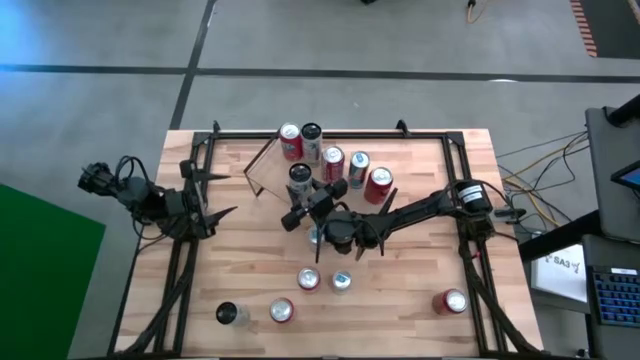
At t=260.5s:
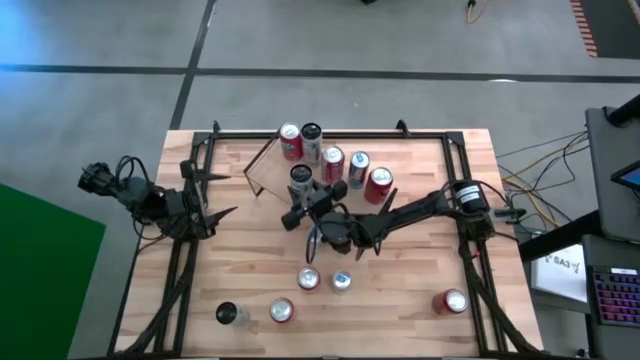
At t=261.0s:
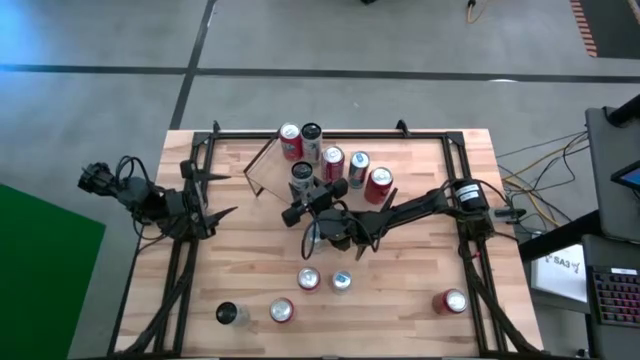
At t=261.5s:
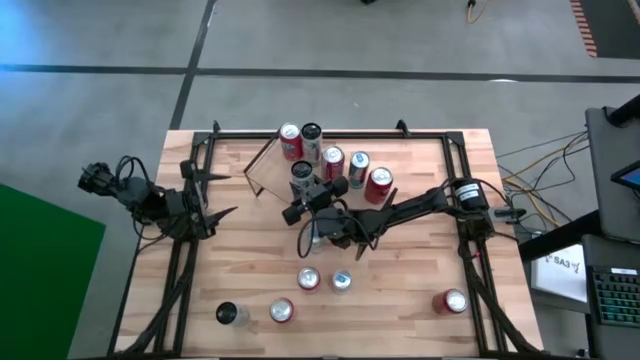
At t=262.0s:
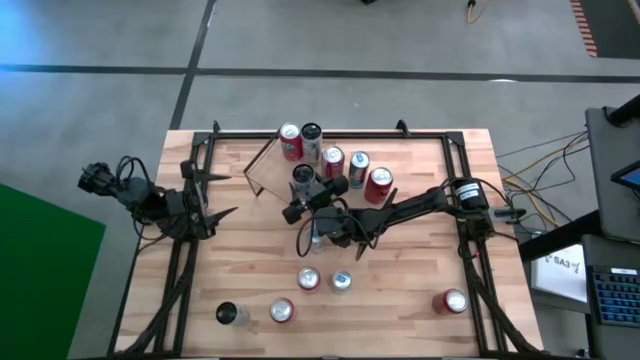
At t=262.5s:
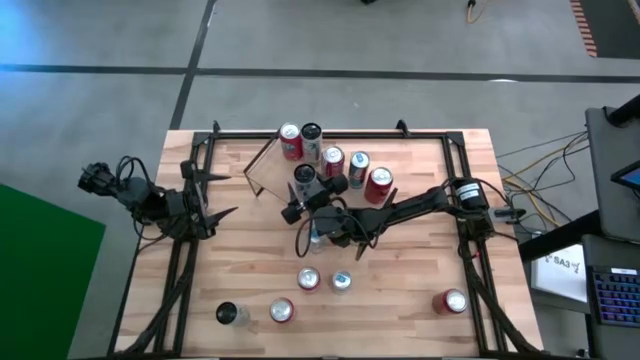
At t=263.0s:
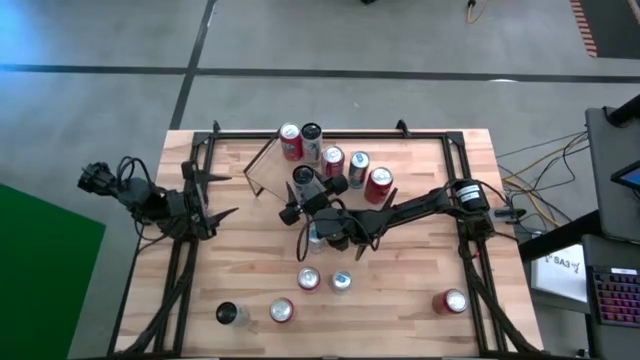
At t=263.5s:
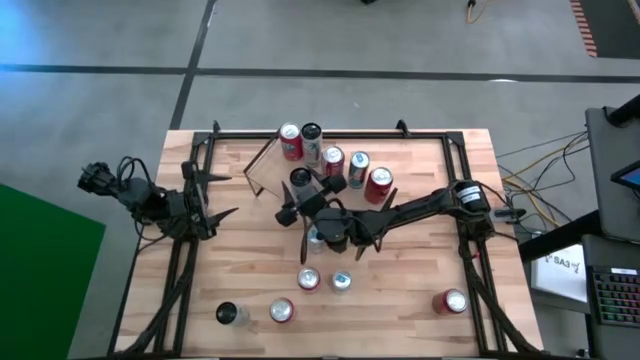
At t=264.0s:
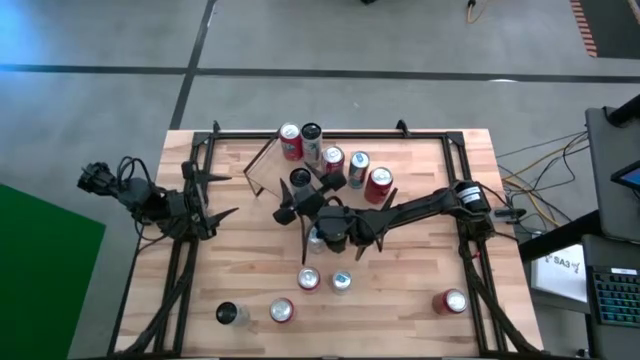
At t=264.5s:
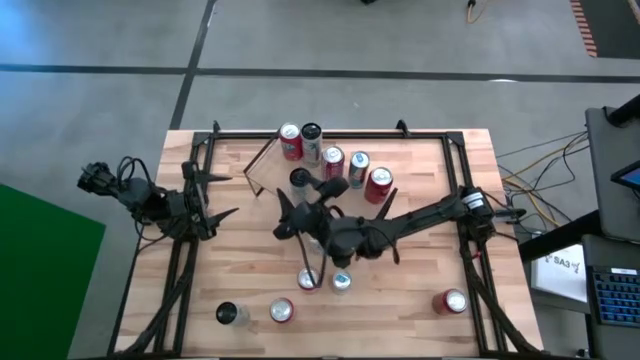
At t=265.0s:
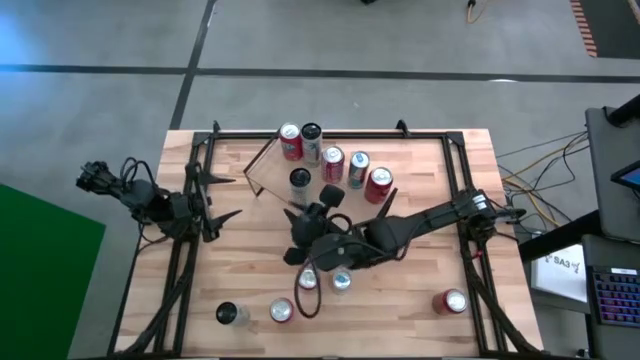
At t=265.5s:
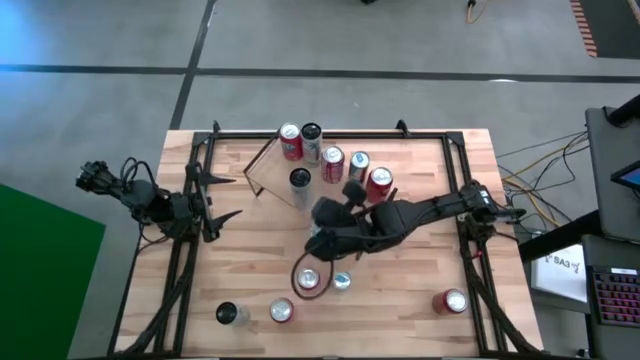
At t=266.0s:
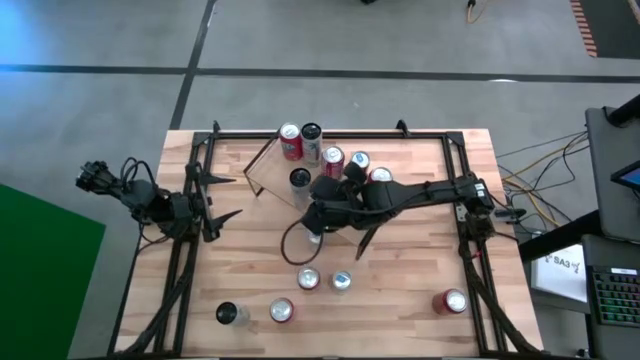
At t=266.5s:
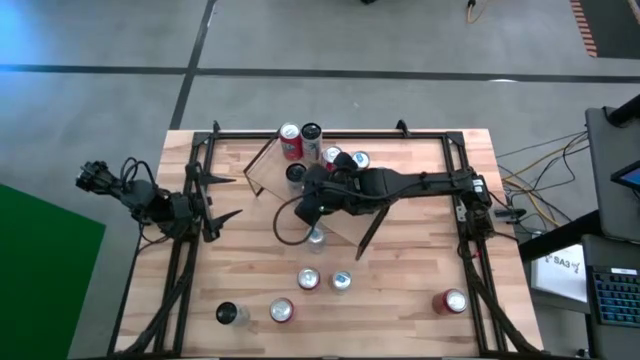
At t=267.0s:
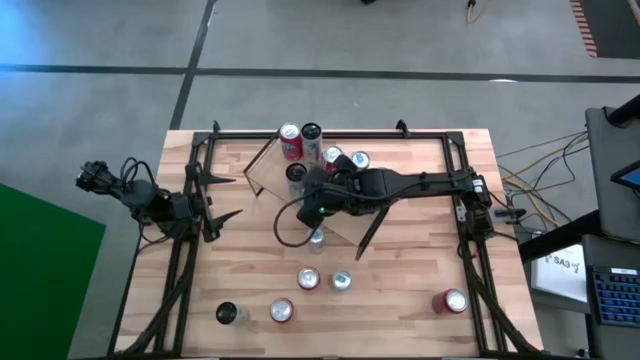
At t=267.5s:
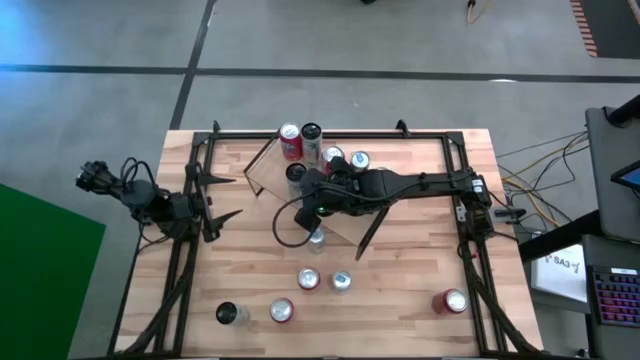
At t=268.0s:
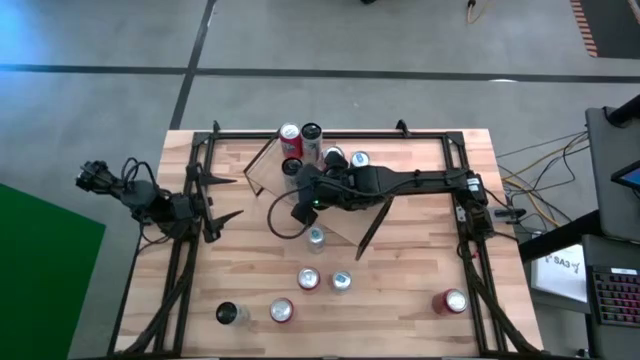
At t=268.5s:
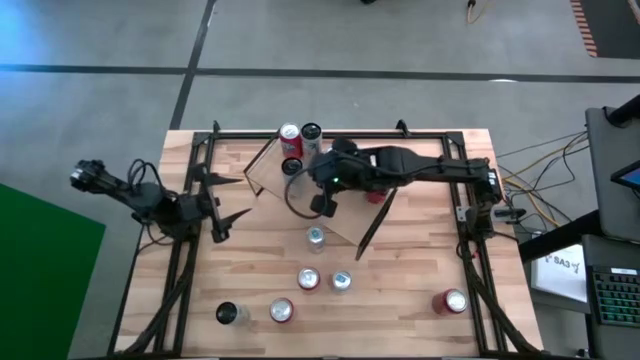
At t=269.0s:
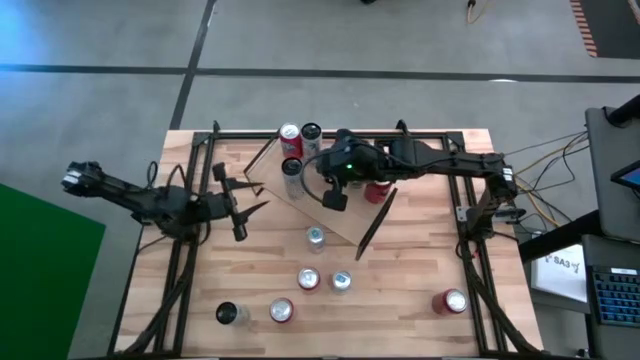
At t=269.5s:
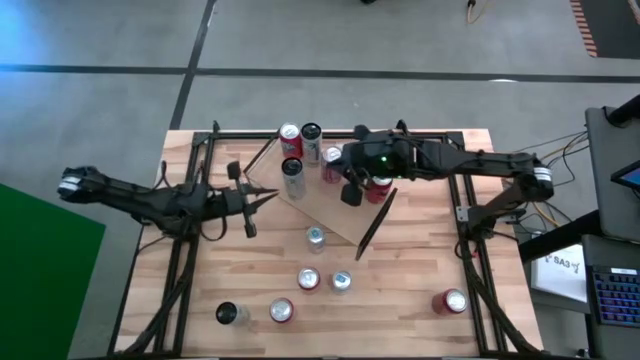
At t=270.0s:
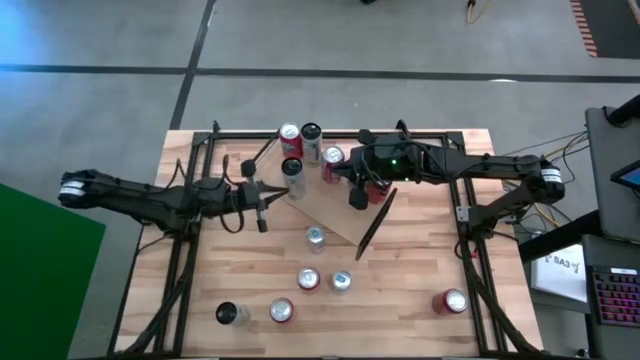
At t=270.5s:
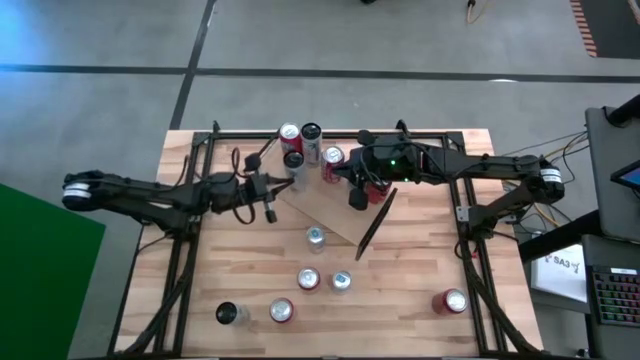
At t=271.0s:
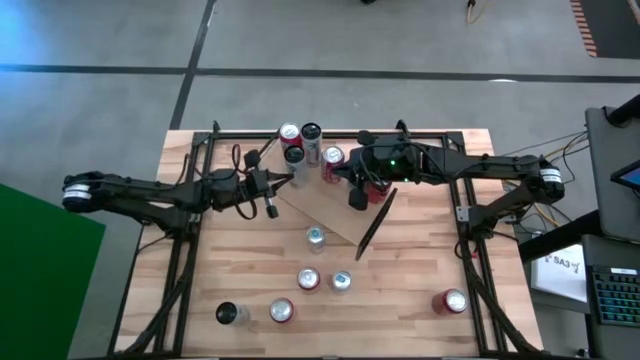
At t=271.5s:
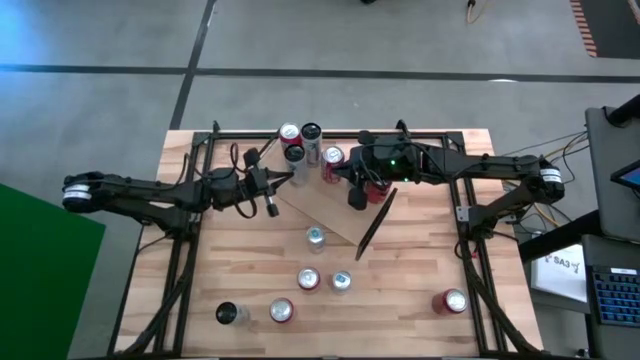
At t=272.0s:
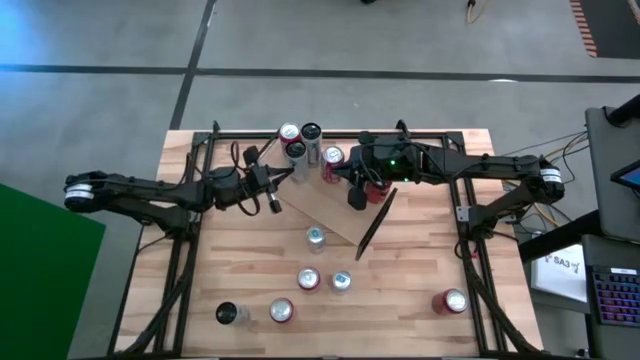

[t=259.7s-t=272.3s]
Task: Place canned beverage on shelf
Put the white/pink soda can on the shelf, align with the other white pink soda can

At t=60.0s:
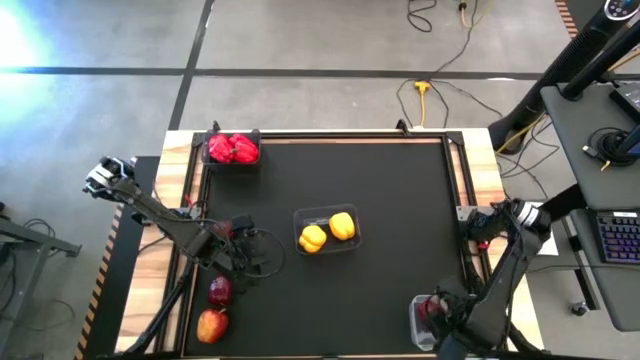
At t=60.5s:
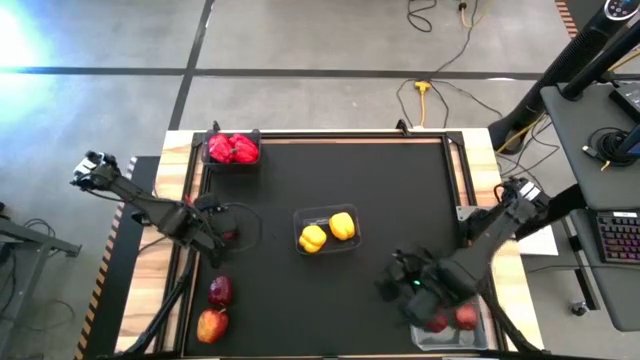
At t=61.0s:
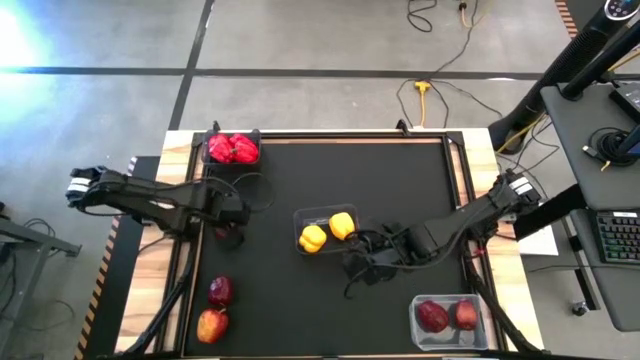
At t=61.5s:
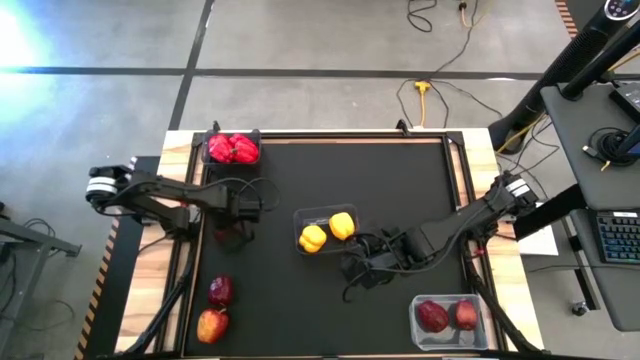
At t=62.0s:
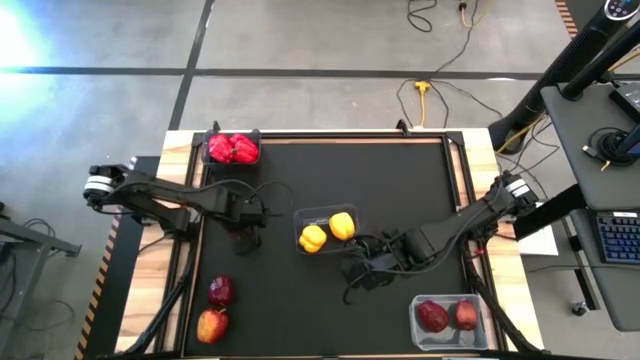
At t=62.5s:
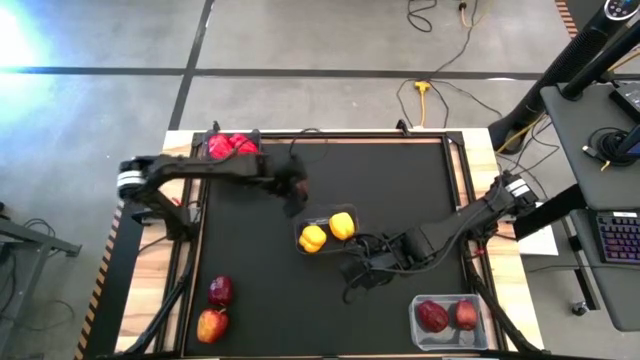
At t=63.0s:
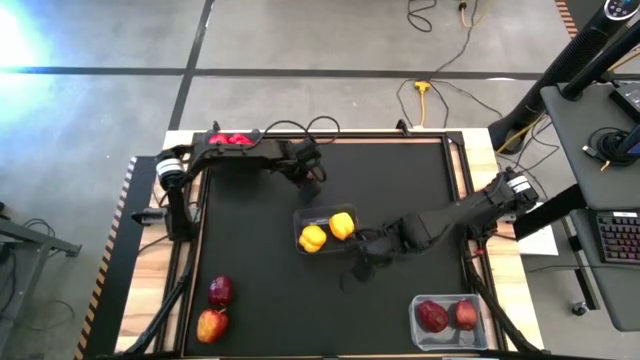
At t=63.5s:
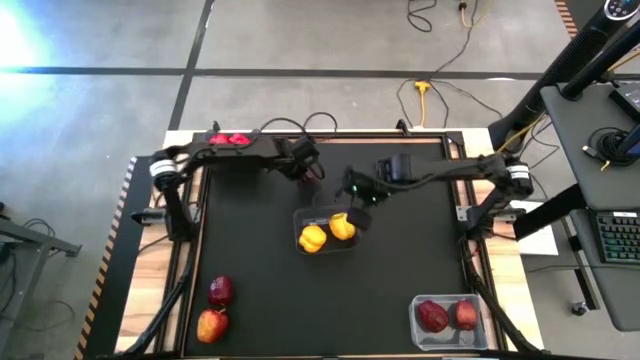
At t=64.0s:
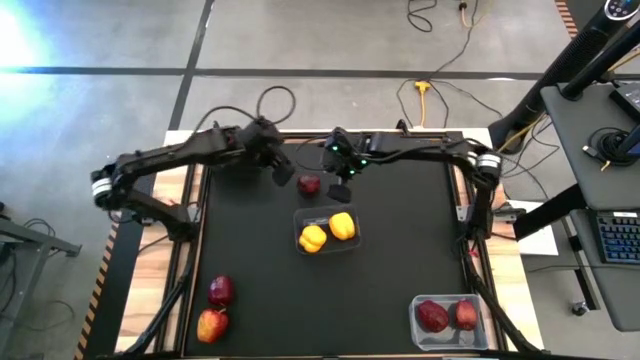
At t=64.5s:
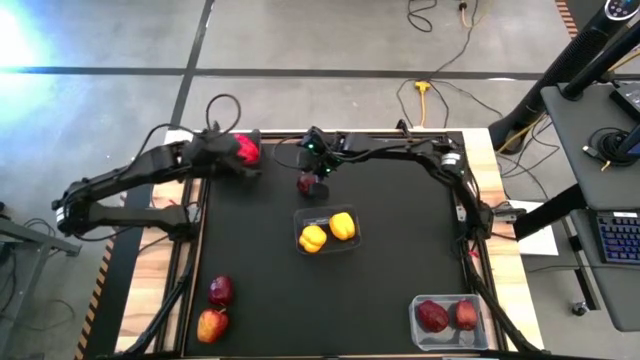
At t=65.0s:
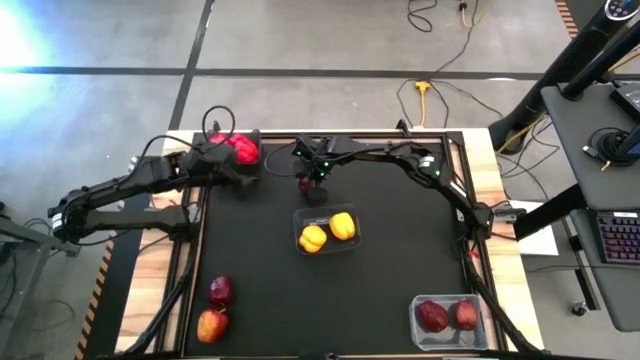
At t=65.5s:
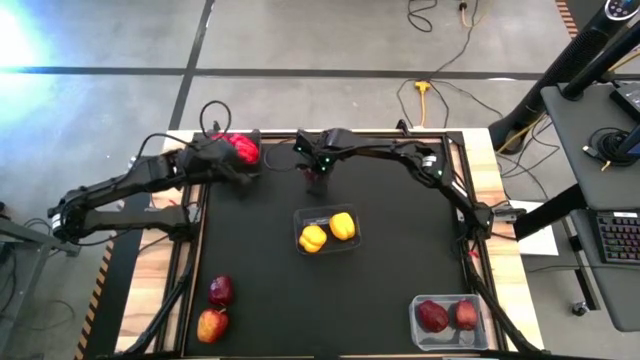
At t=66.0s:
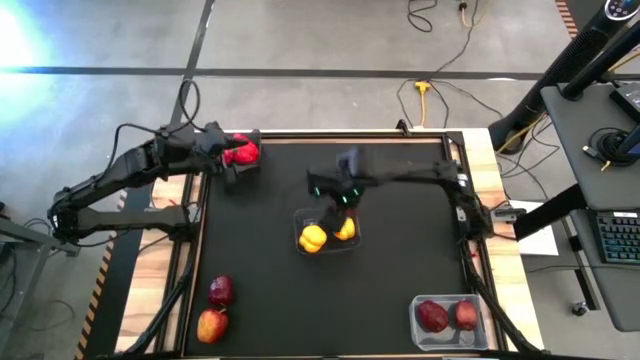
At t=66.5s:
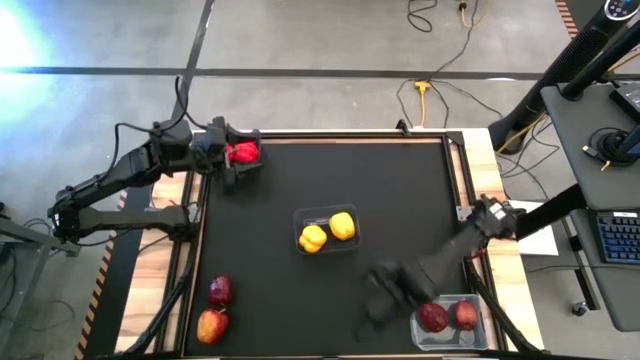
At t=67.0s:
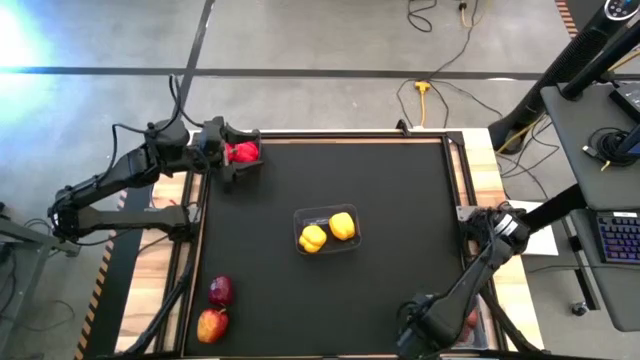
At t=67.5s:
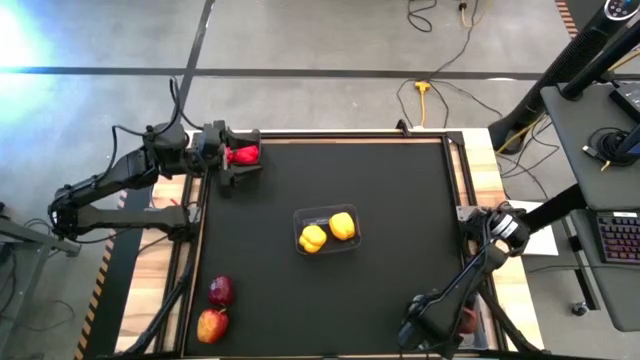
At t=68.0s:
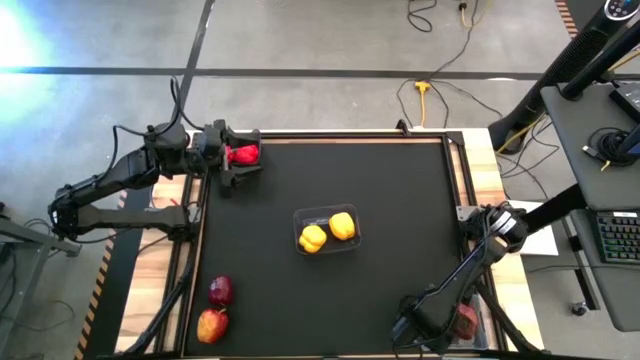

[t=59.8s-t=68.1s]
Task: Sort produce into baskets
Put the red apple into the transparent bin
